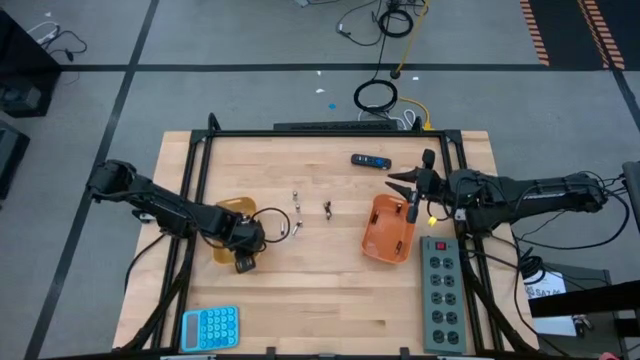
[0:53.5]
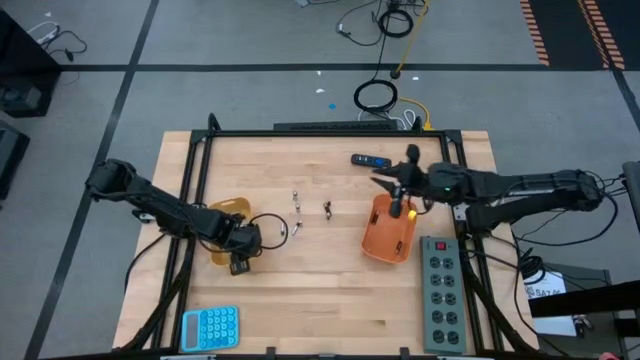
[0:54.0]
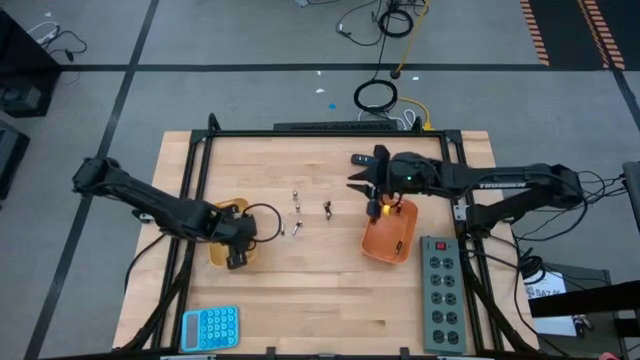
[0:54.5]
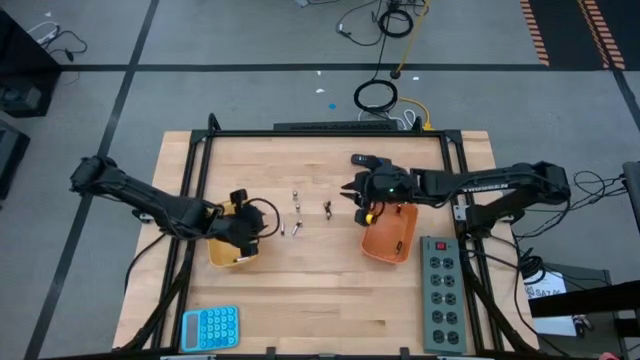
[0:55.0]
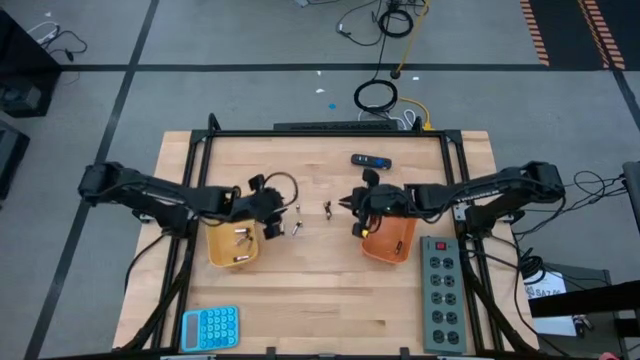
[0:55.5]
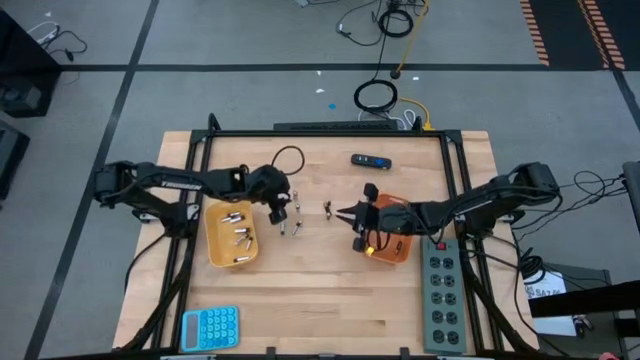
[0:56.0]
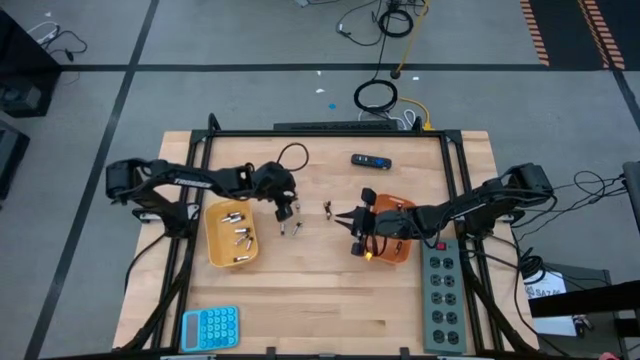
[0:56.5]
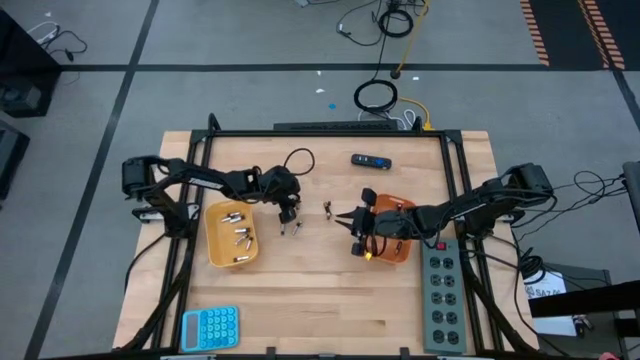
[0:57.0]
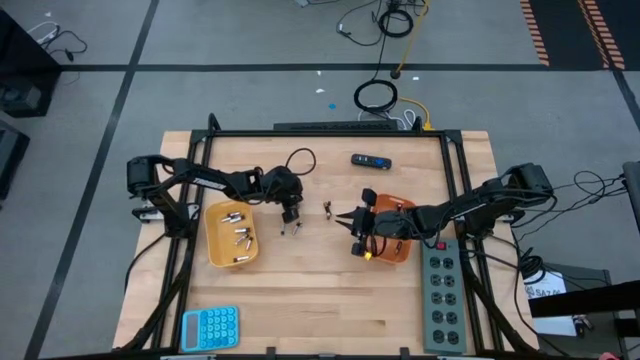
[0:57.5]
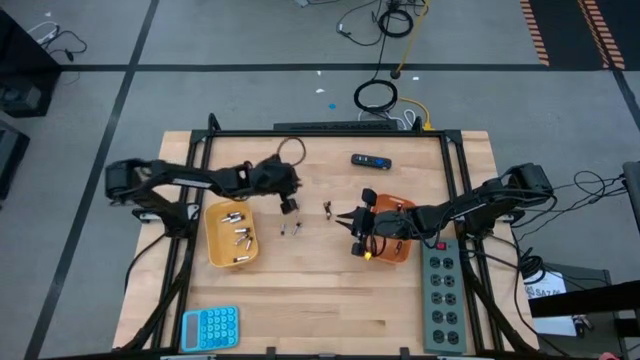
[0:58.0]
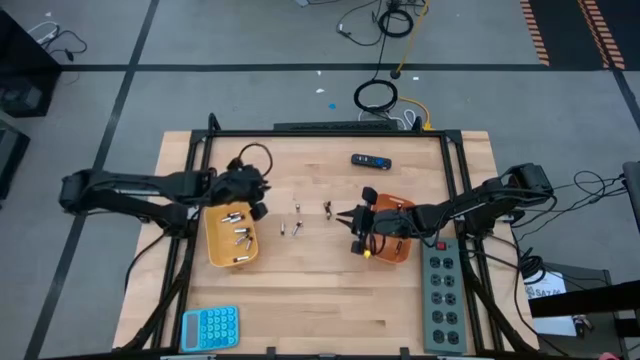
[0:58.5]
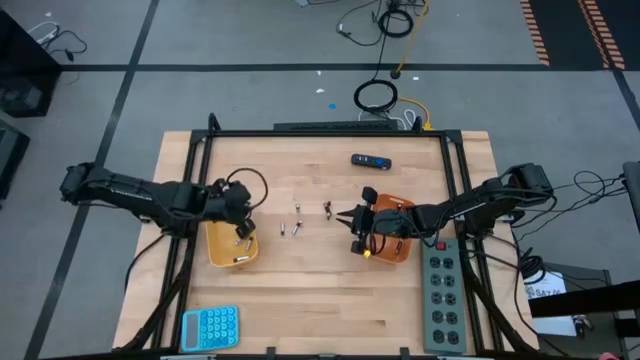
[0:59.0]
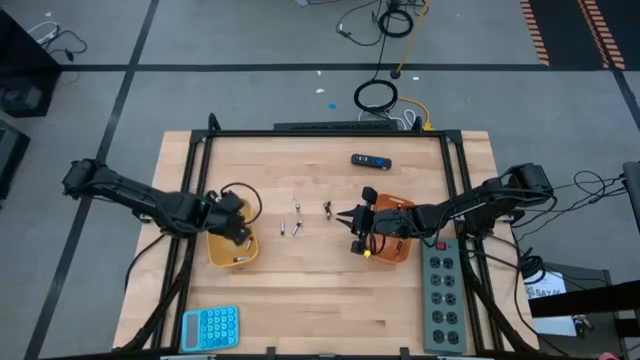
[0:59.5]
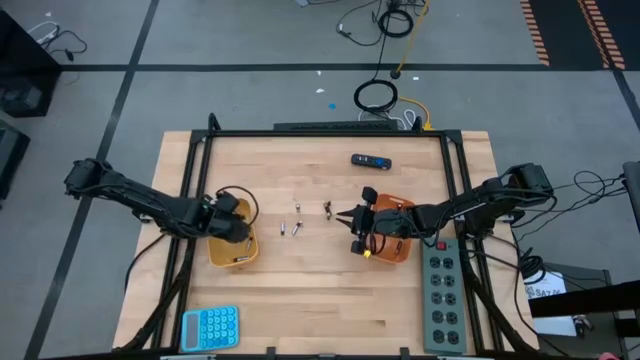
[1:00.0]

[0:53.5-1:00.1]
Task: Sort batteries
Put the silver battery into the yellow bin

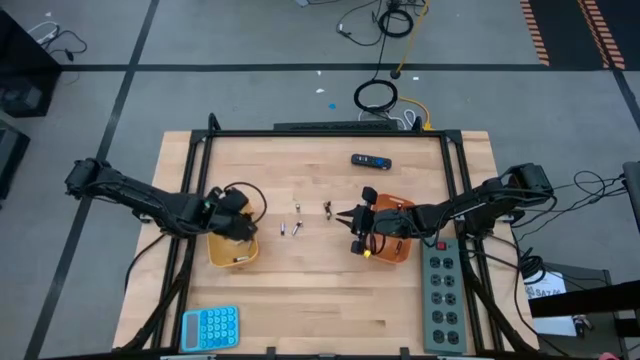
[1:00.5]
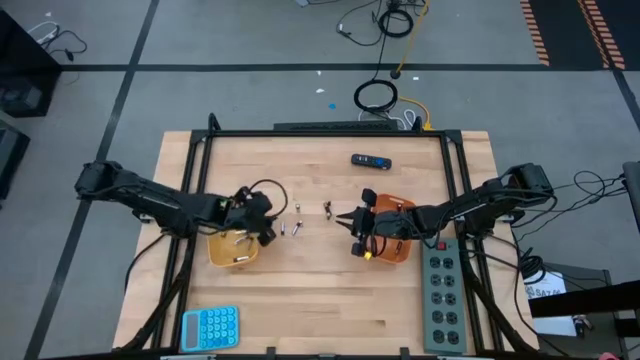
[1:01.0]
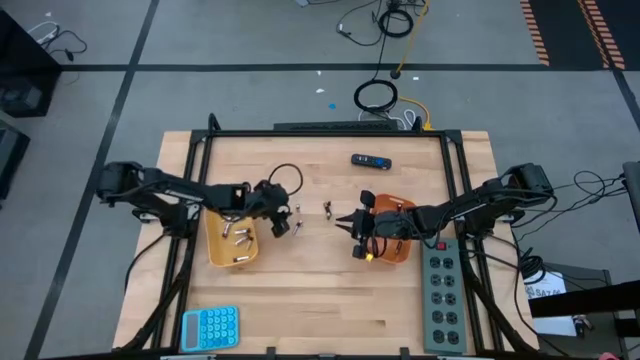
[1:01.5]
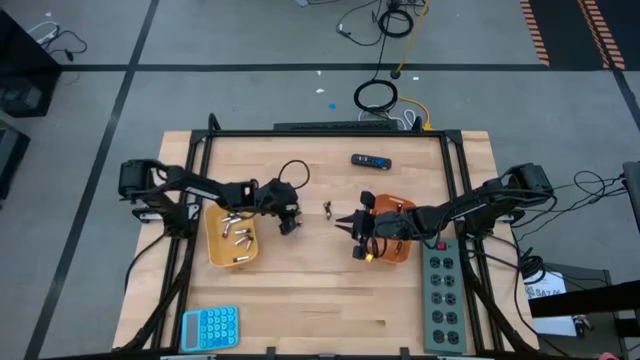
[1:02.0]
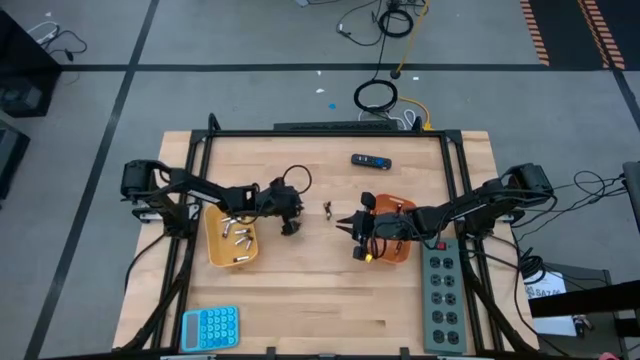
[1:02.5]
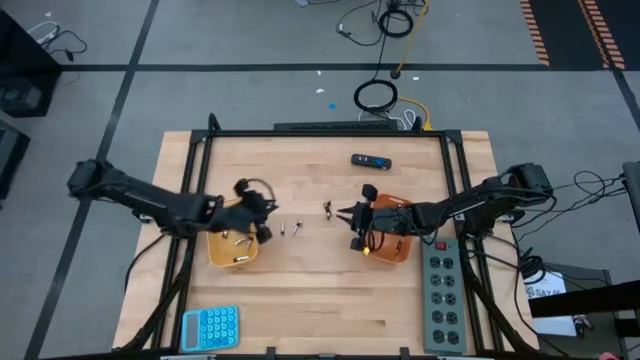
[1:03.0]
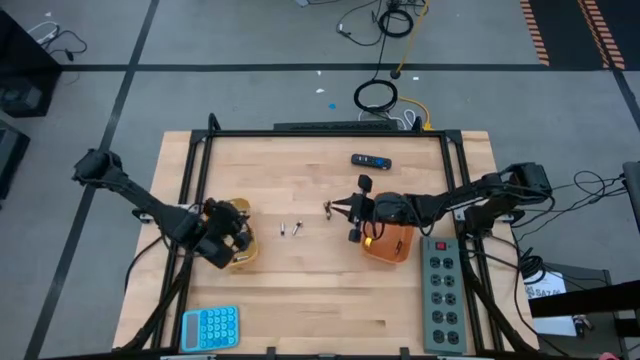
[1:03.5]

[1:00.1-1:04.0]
Put the silver battery into the yellow bin

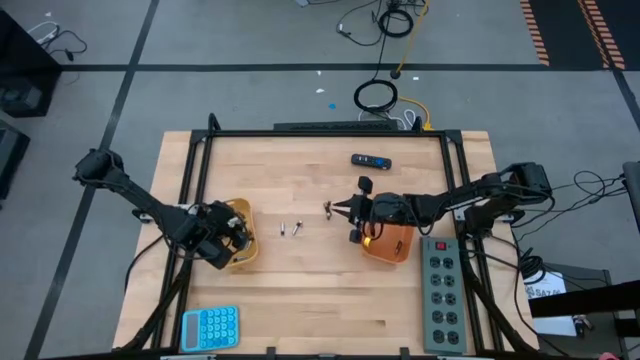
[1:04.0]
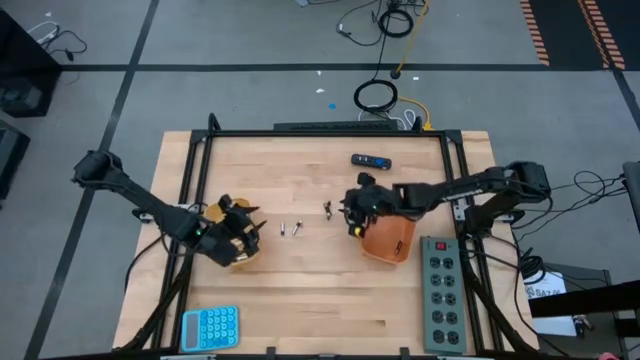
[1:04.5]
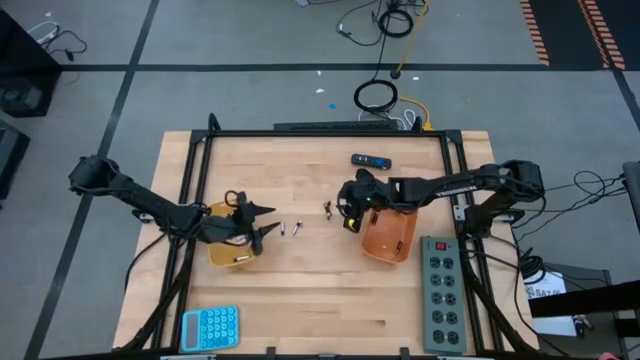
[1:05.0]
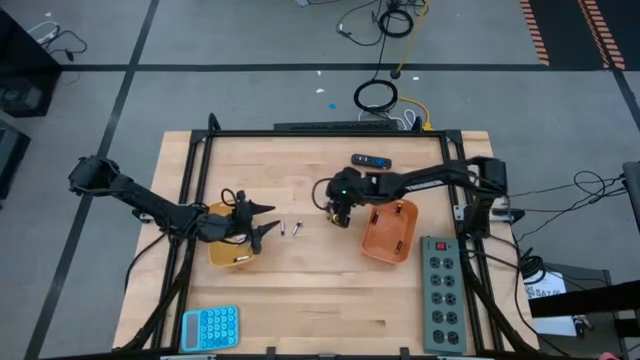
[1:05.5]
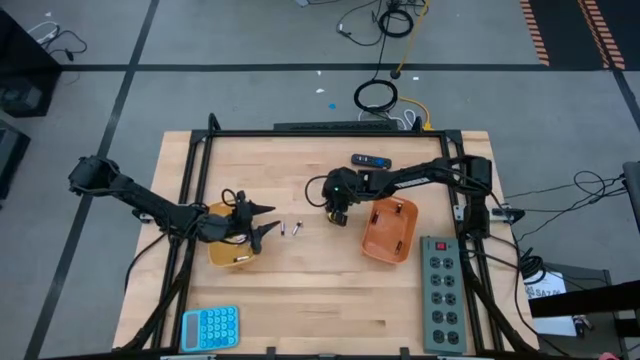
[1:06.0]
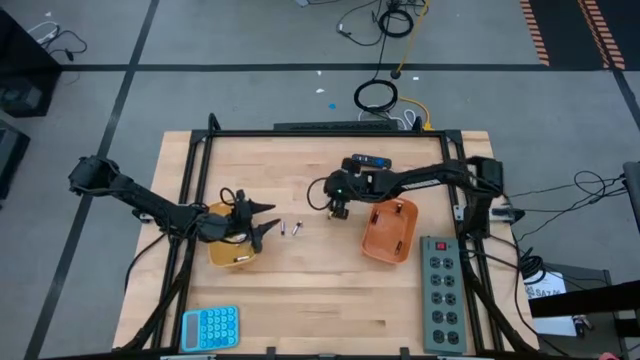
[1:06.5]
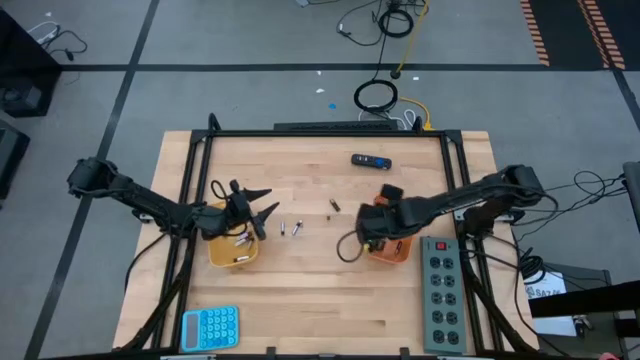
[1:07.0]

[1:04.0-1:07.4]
Put the black battery into the orange bin

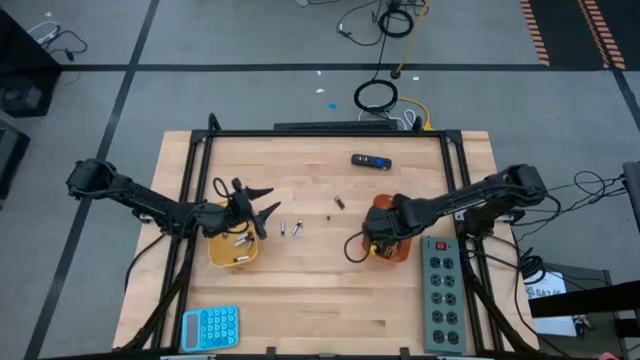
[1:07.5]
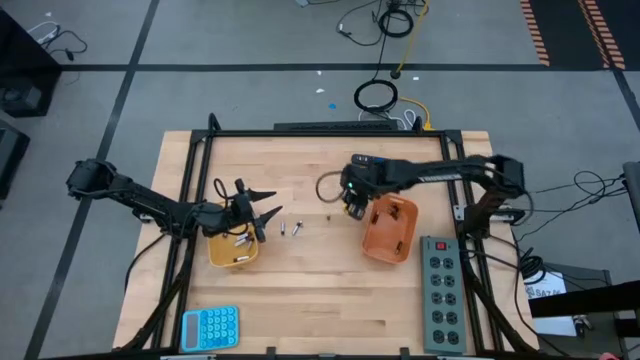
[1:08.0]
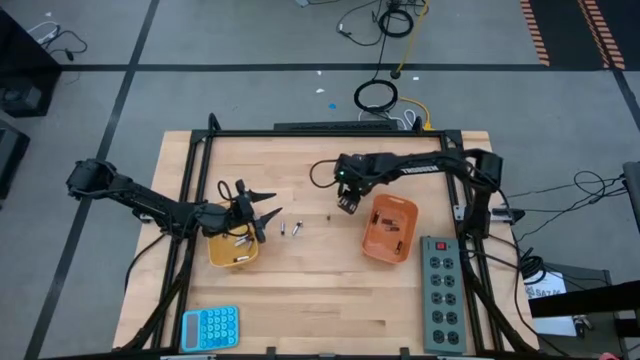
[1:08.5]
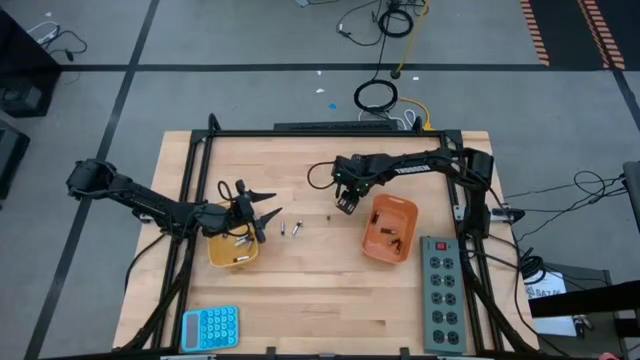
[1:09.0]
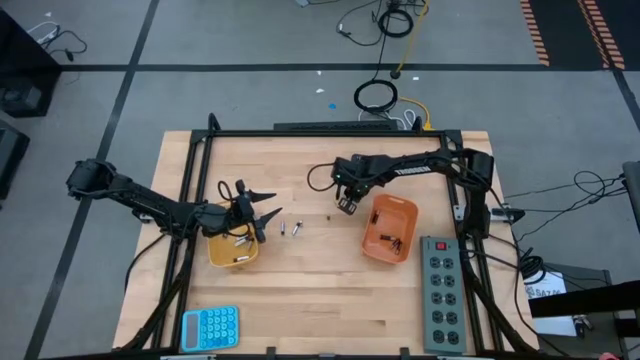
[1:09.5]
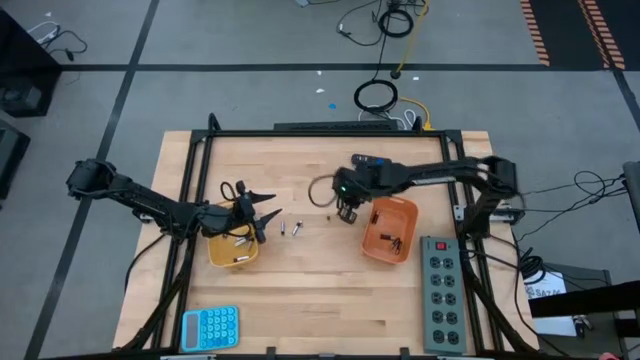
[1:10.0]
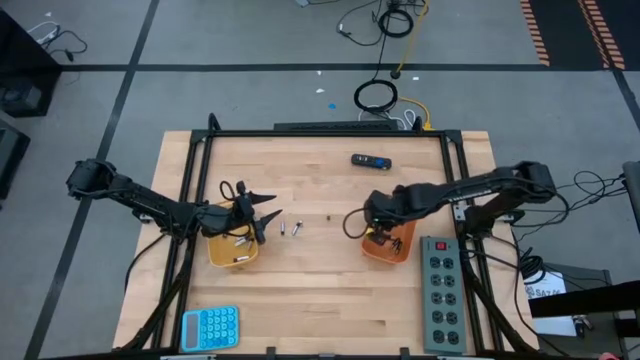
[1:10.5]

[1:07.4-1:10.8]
Put the black battery into the orange bin

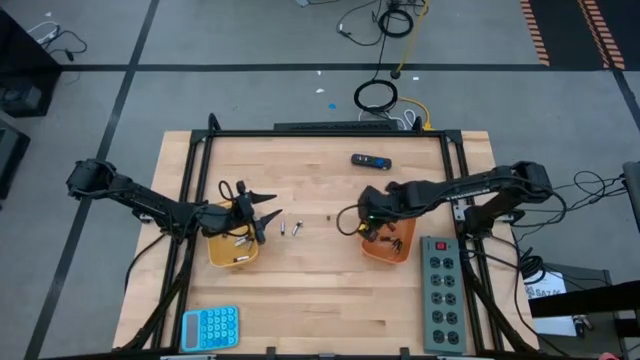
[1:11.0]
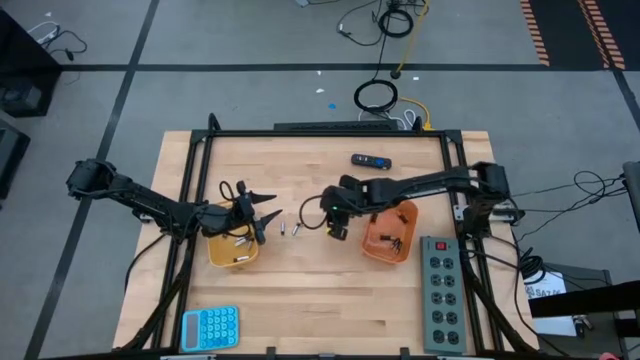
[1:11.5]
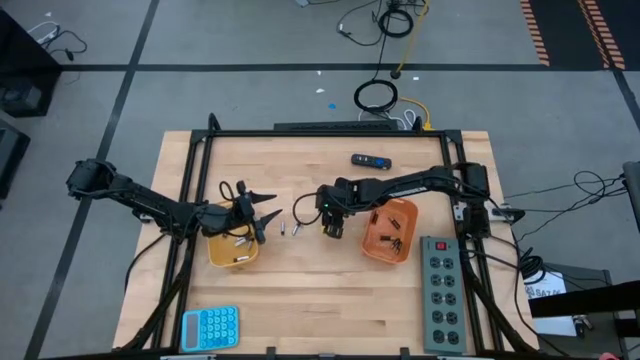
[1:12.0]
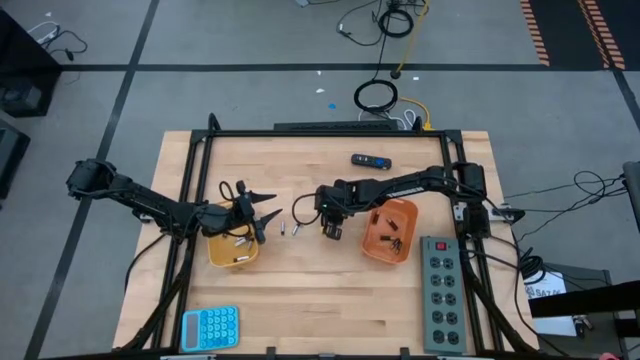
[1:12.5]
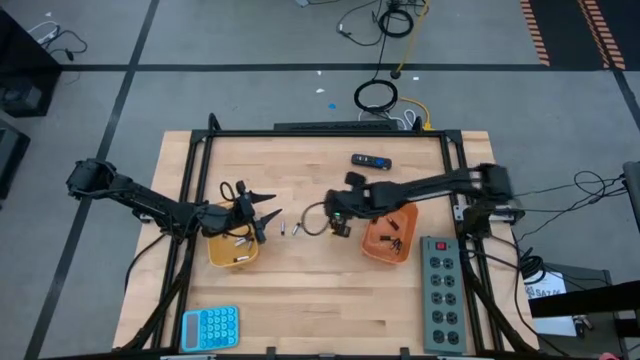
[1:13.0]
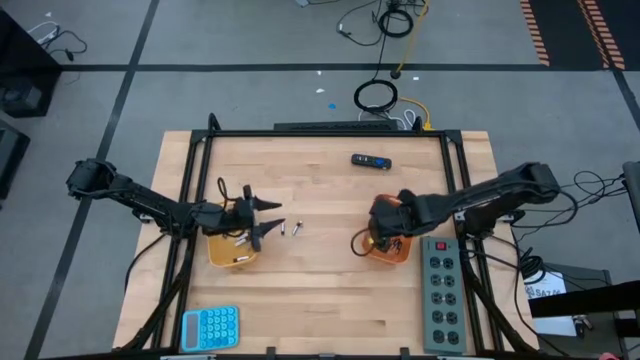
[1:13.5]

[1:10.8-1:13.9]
Put the black battery into the orange bin
